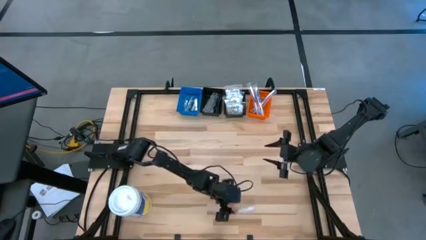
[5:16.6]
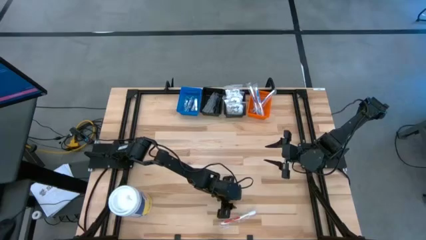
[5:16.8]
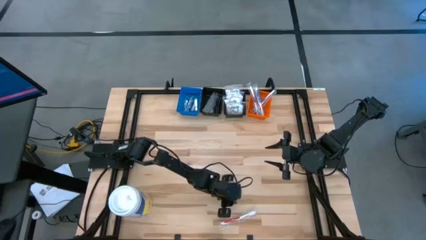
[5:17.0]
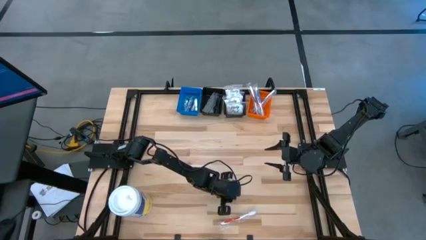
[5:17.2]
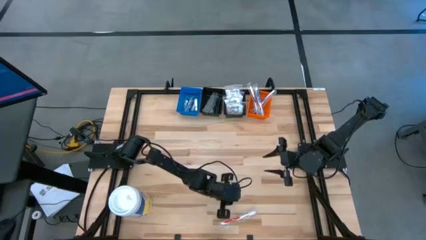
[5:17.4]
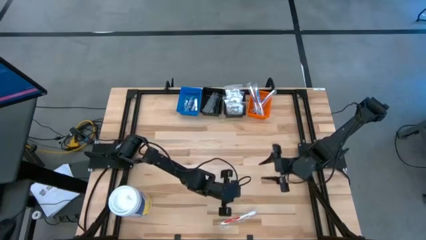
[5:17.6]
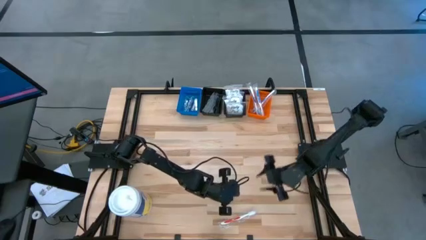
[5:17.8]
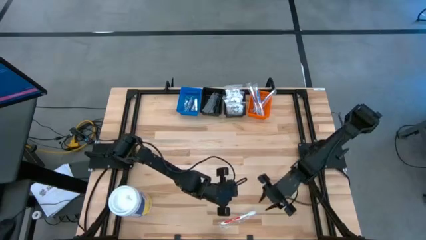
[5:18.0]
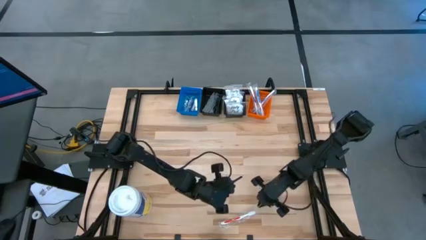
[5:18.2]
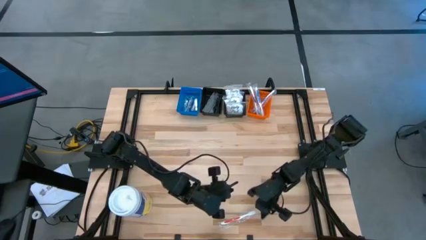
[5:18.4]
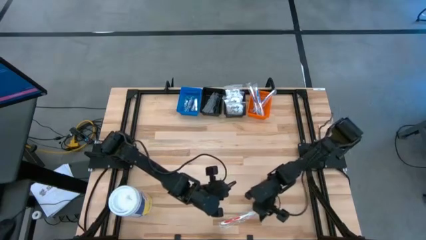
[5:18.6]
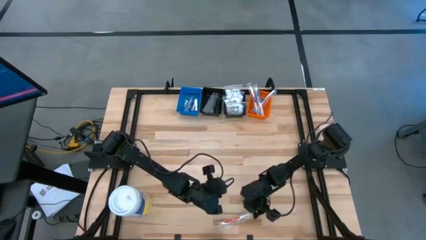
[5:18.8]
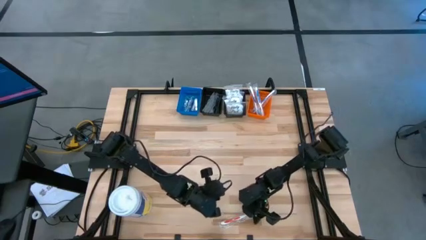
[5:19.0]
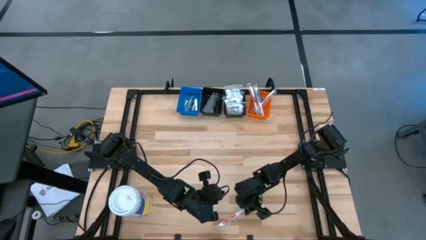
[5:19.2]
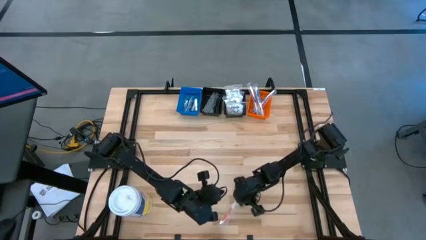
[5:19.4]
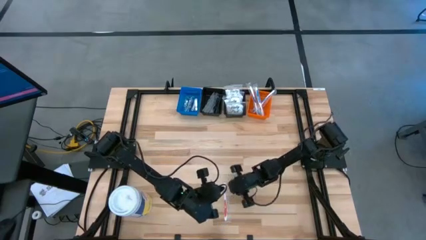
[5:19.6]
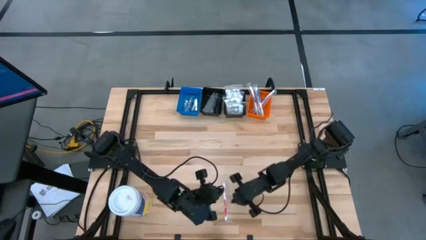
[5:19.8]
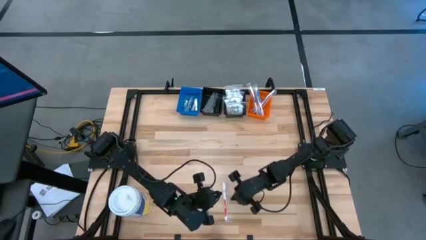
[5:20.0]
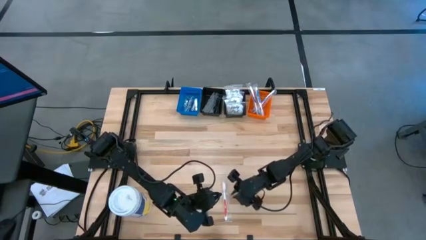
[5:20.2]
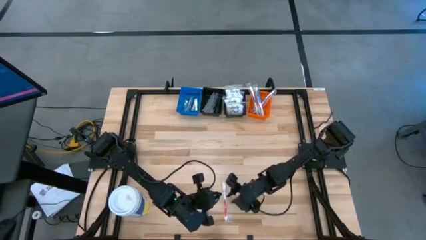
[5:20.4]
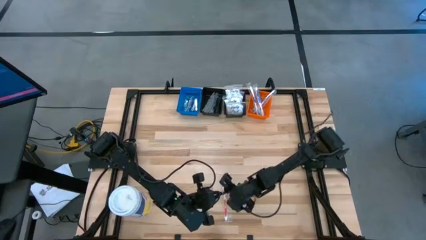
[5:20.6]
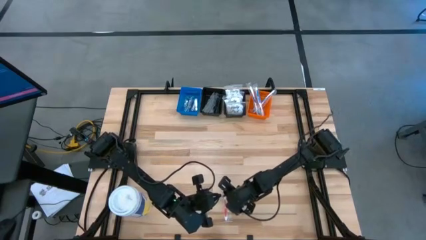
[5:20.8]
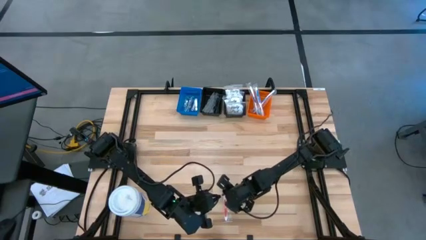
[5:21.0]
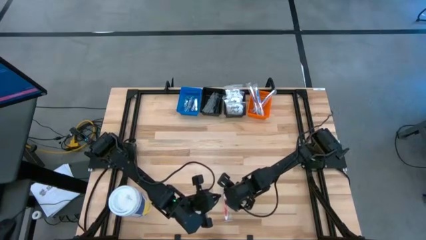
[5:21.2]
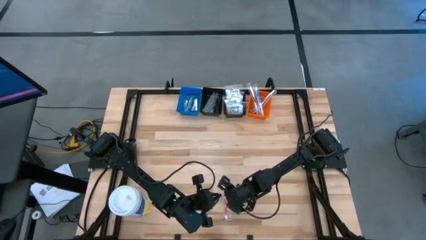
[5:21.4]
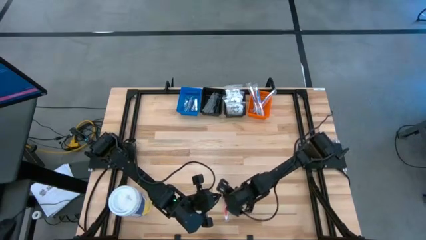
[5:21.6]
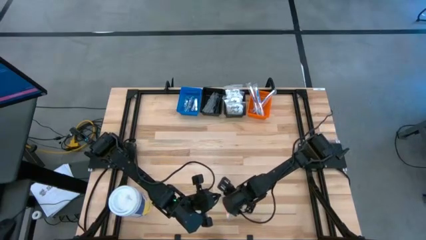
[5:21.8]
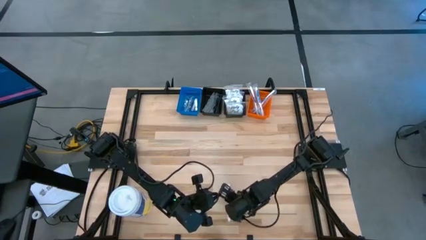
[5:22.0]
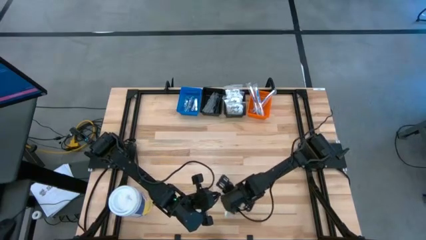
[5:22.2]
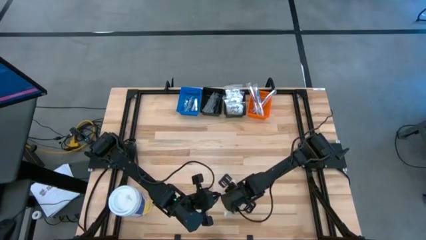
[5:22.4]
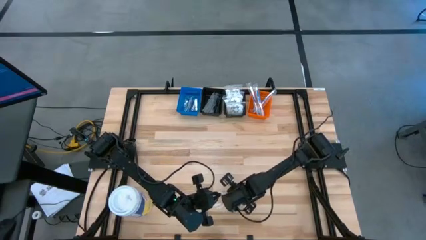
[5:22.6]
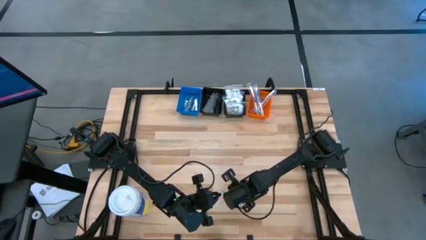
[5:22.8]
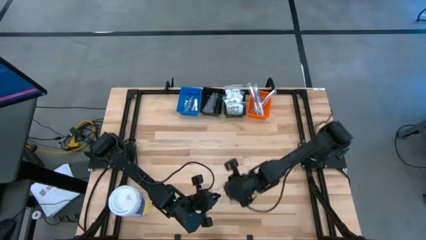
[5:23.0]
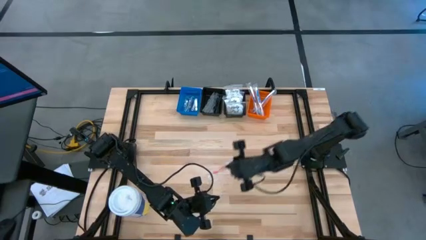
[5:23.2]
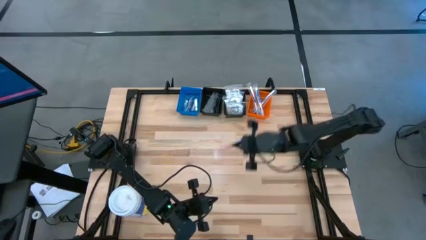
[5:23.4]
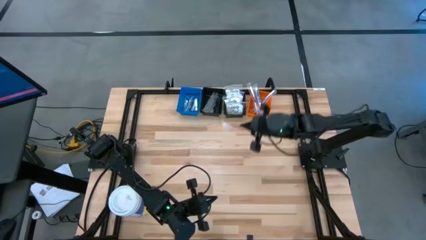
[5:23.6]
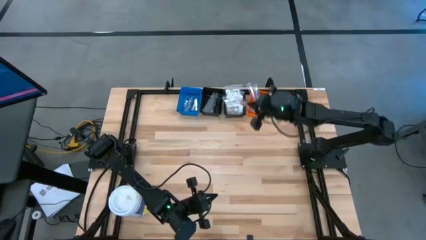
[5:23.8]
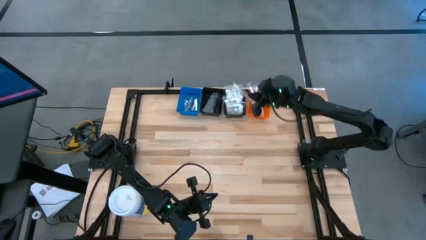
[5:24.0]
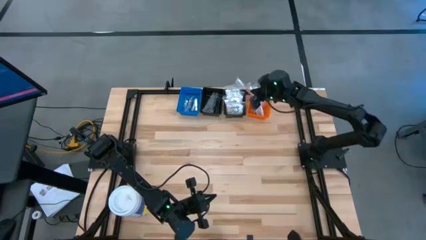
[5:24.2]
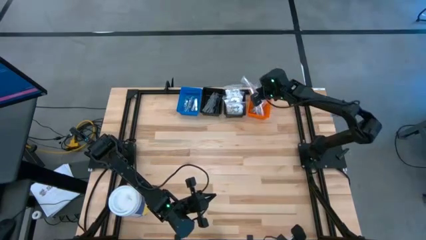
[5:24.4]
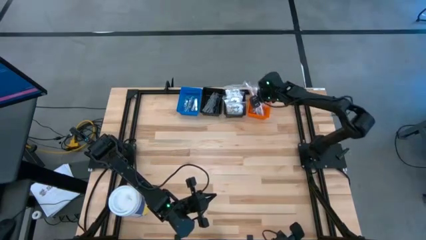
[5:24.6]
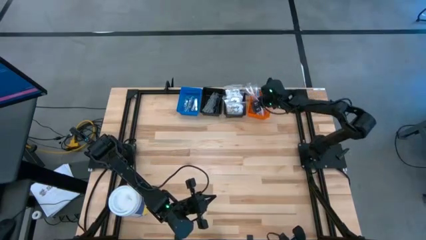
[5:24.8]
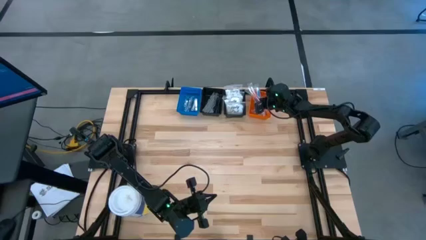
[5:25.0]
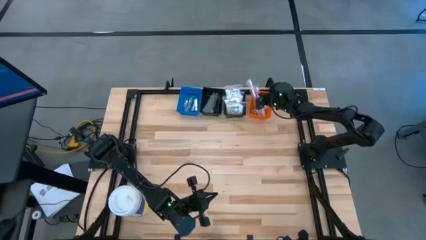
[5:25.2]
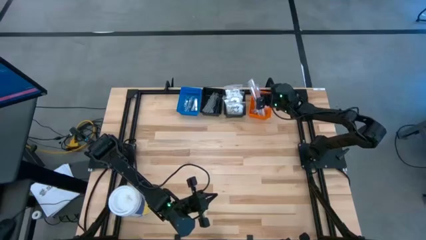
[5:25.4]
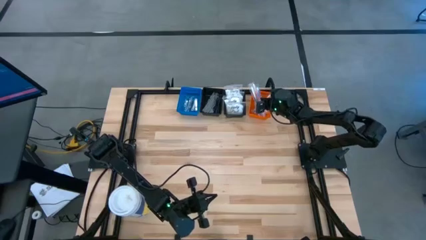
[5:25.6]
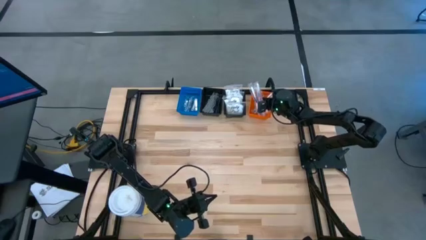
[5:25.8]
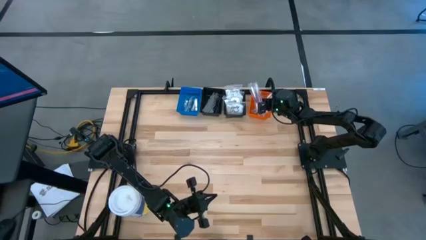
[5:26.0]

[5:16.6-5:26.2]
Task: Pick & Place Travel size toiletries
Put the orange toothbrush into the orange bin

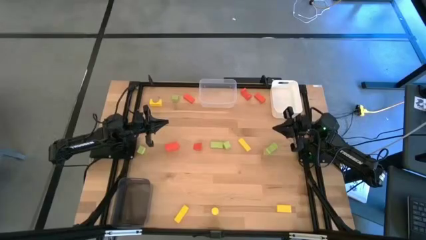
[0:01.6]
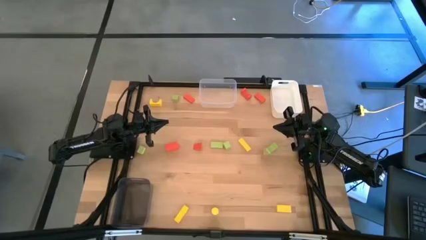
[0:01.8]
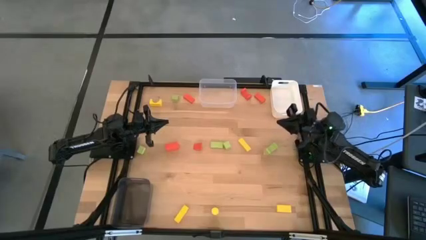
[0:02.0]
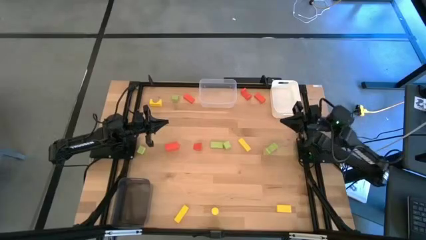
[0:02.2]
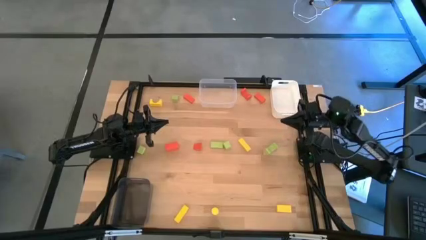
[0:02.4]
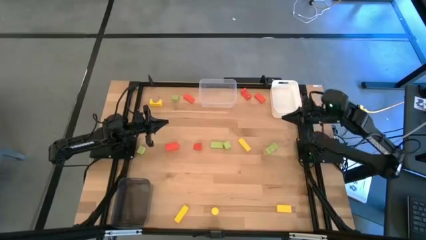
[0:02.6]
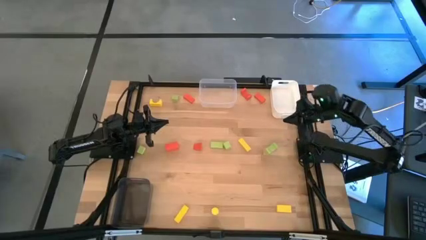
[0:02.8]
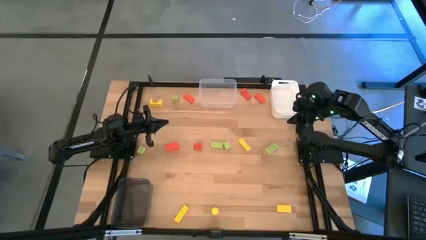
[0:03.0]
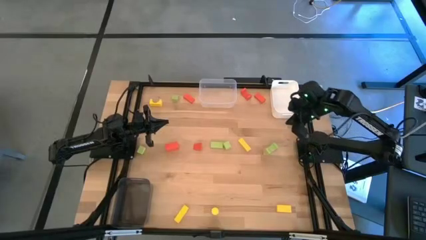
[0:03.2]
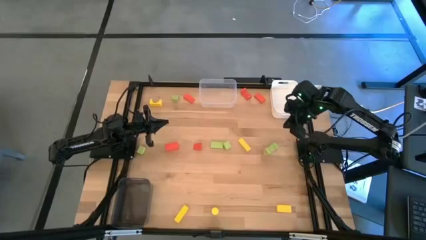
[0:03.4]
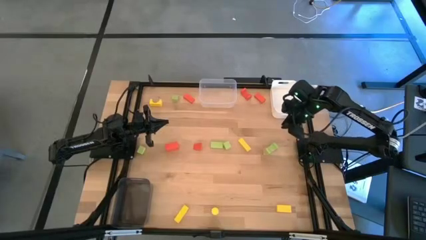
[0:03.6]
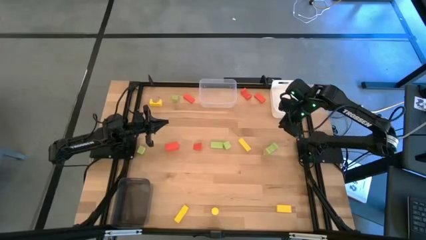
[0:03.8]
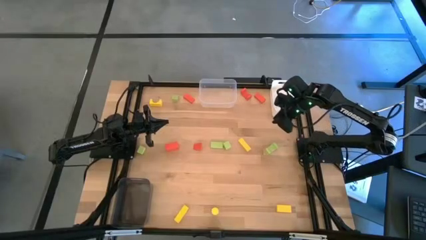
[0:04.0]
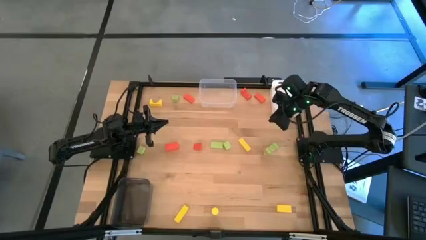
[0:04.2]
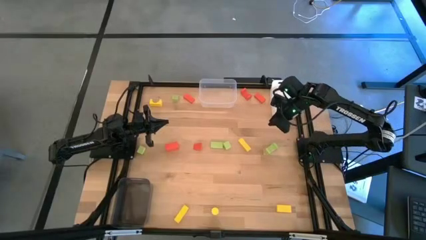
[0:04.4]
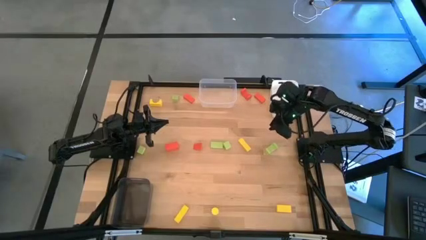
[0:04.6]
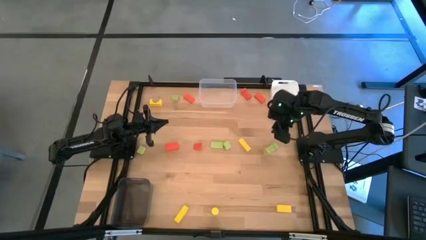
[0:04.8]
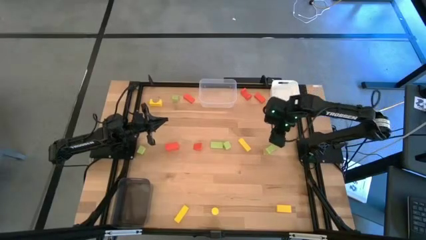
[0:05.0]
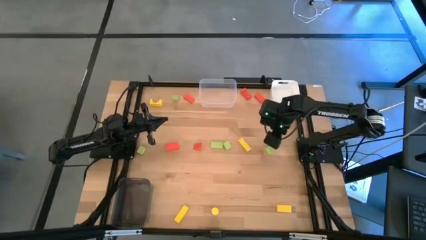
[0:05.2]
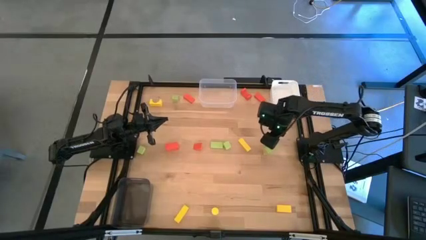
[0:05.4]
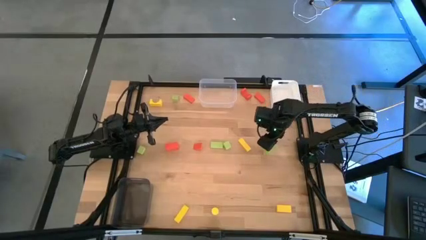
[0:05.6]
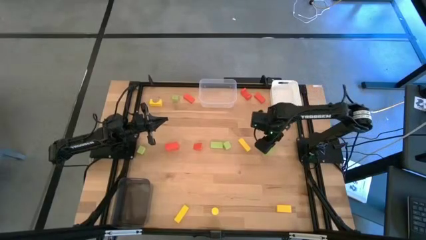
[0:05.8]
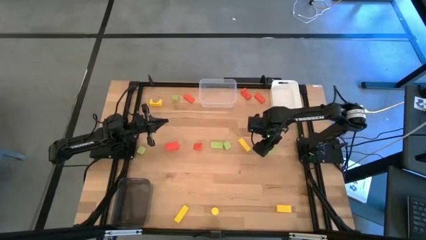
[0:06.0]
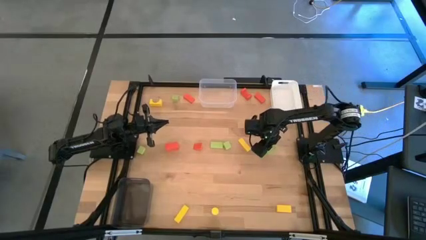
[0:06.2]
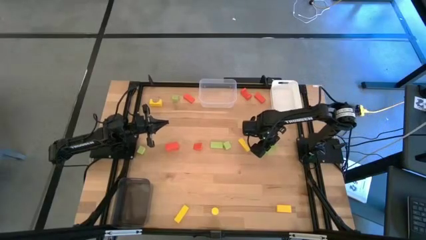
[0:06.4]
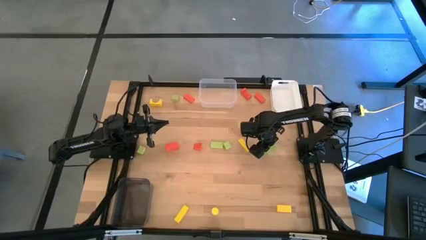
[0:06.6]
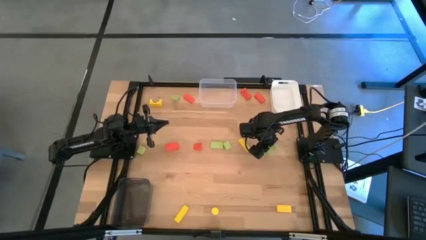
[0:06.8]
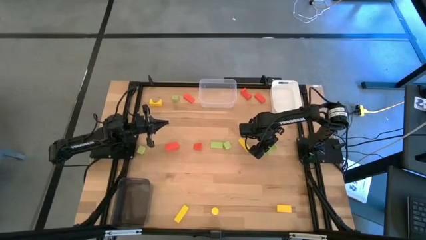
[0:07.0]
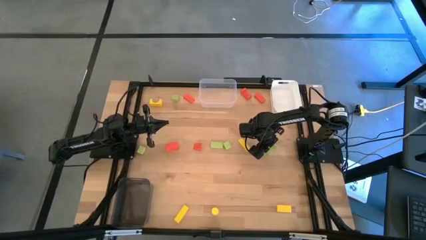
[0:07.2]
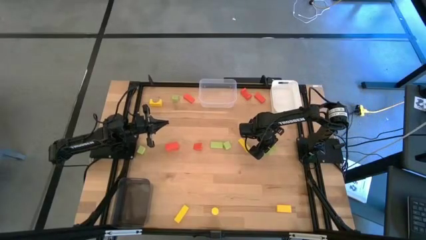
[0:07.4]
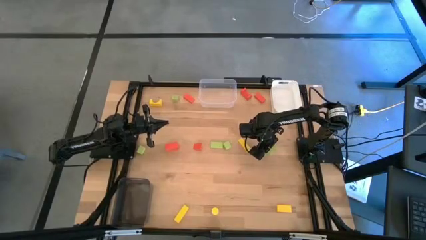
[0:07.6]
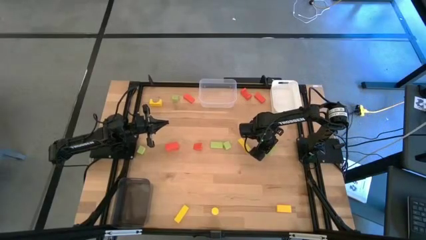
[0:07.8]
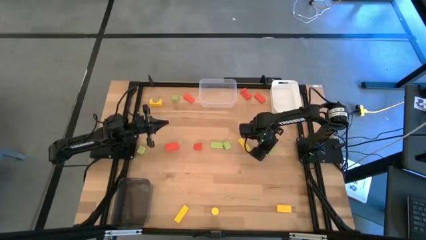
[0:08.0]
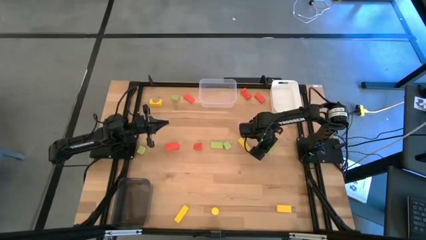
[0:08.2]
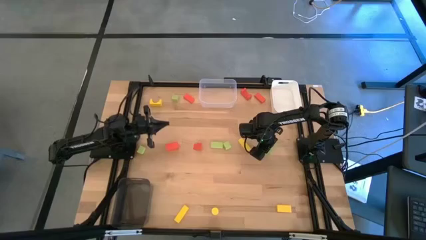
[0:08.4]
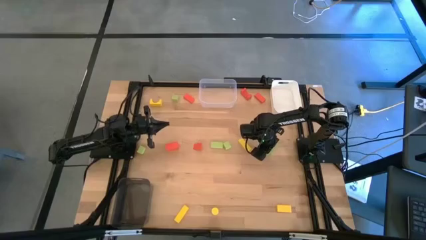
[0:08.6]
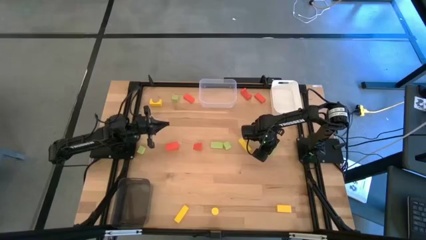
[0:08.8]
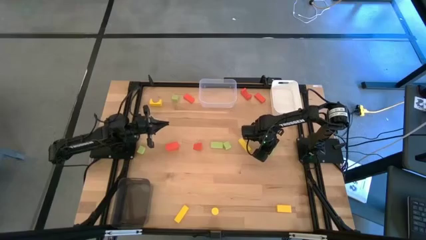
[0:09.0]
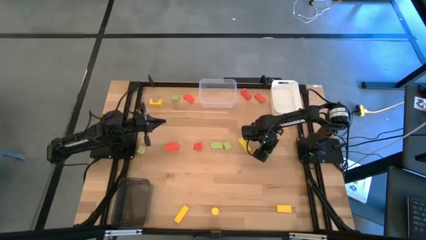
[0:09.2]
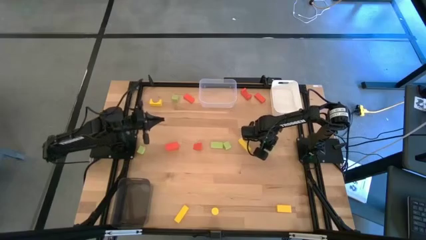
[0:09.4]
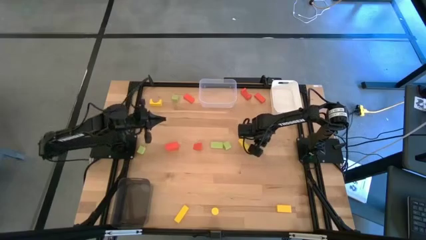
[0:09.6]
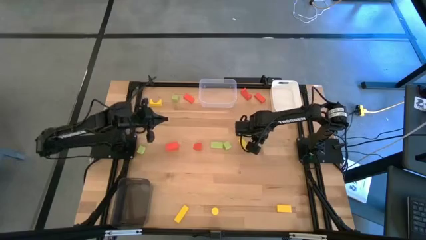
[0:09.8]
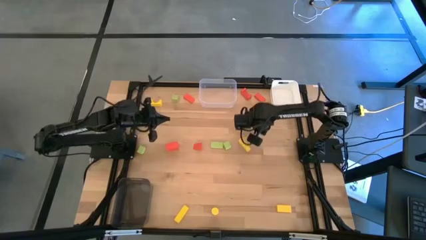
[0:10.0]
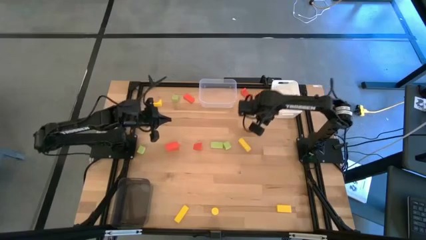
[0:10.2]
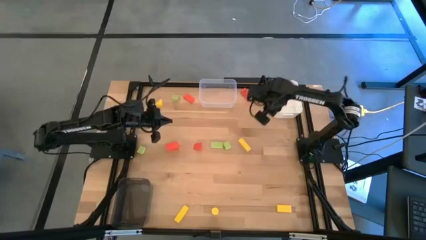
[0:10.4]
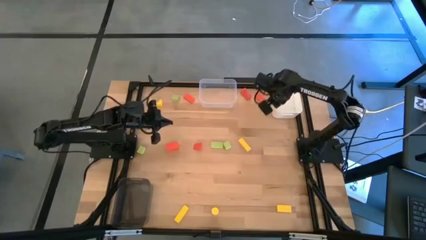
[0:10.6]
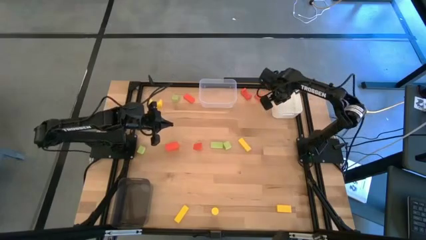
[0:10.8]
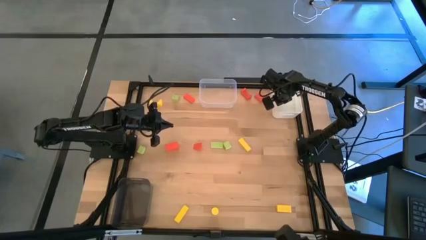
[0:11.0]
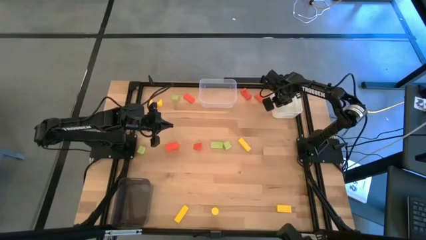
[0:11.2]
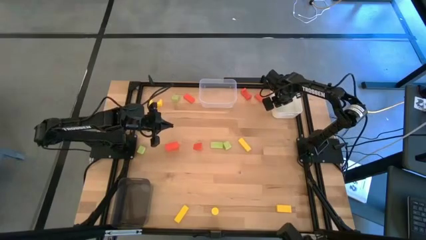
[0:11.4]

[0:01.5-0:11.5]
Task: Sort & place blocks by color
Put the green arched block into the white bin
